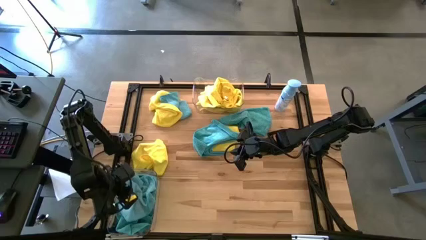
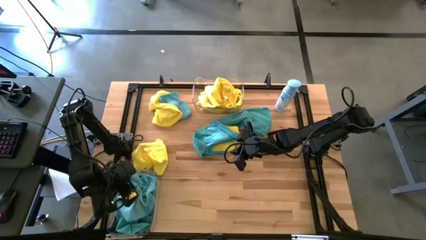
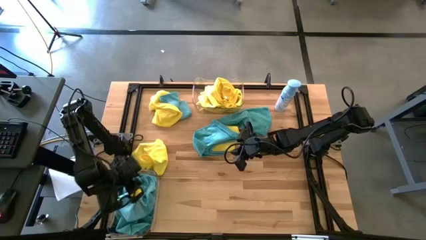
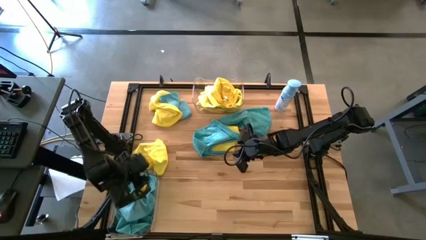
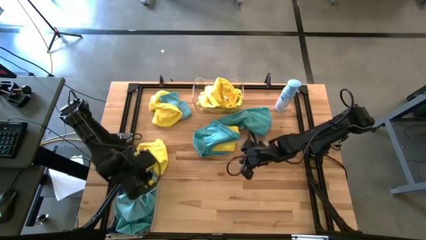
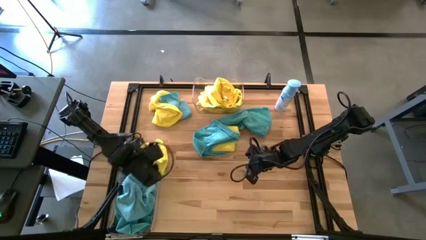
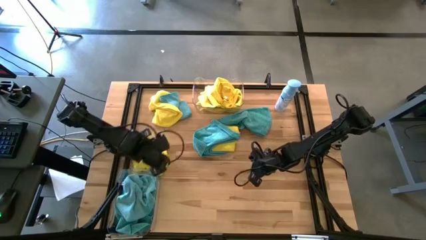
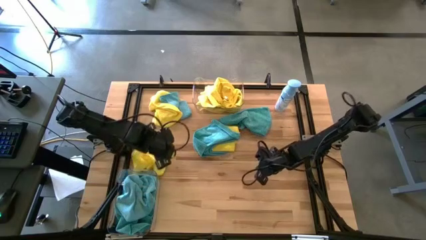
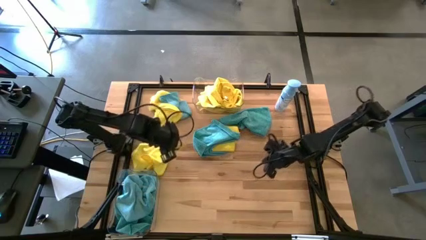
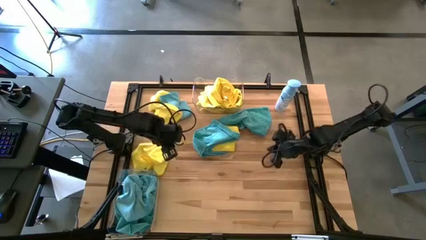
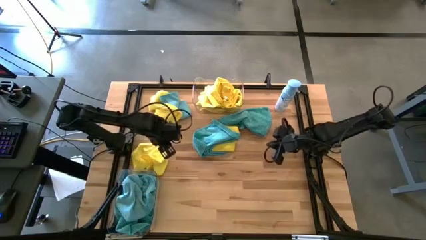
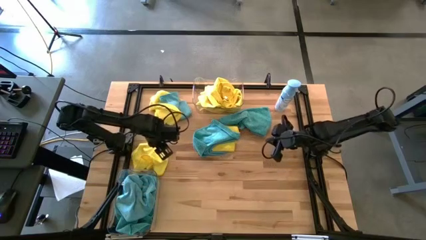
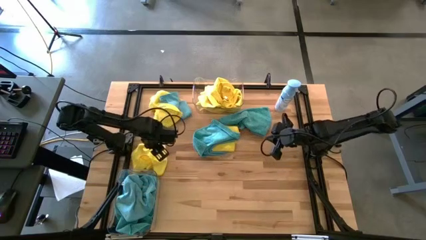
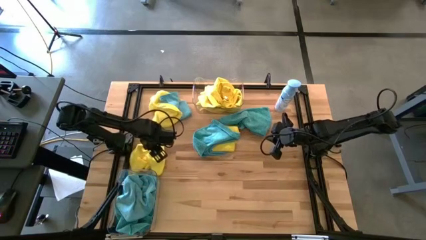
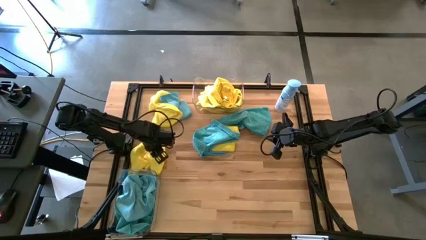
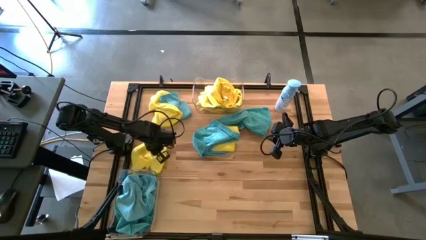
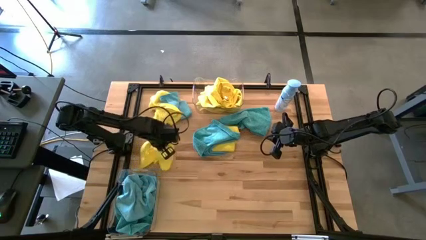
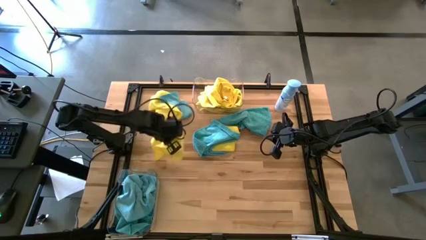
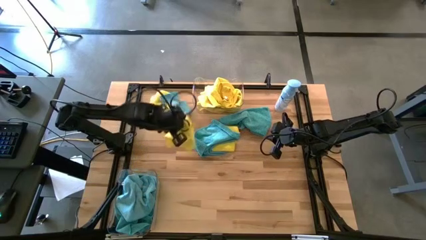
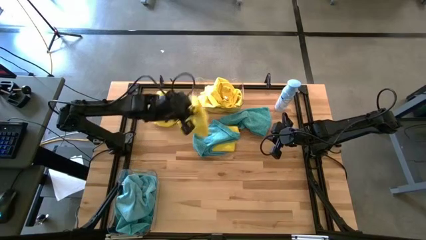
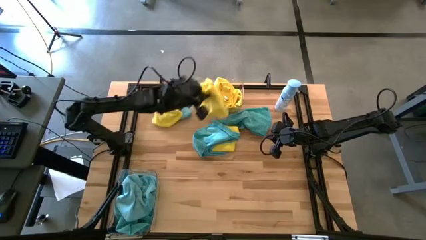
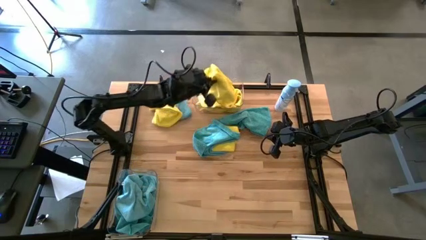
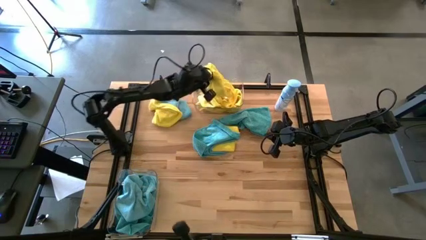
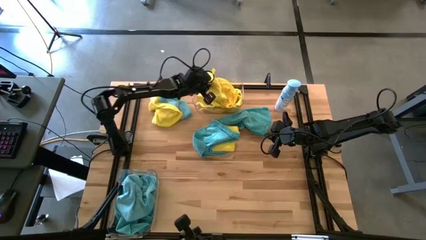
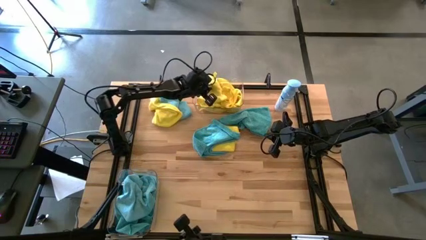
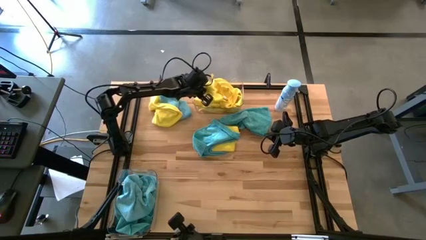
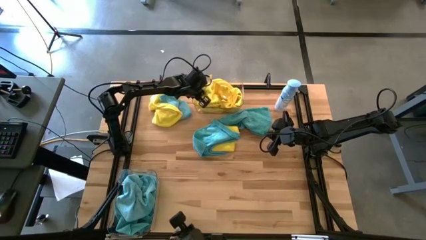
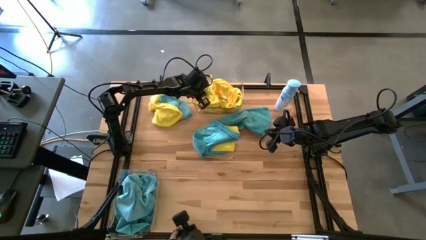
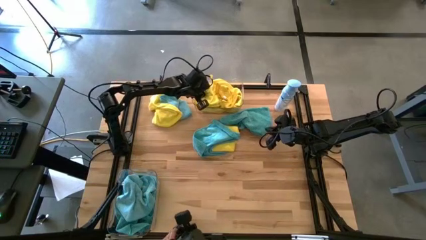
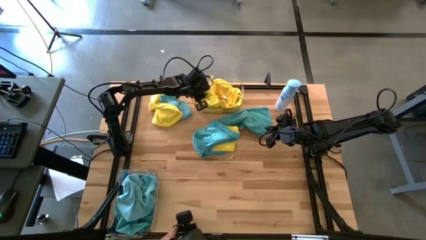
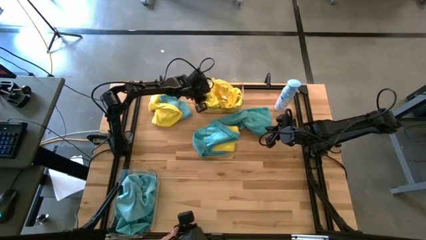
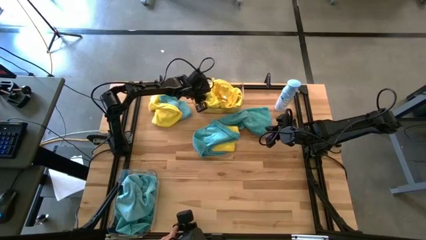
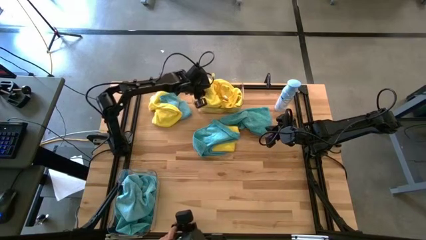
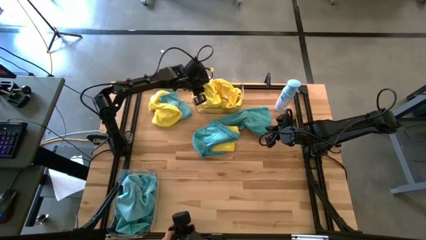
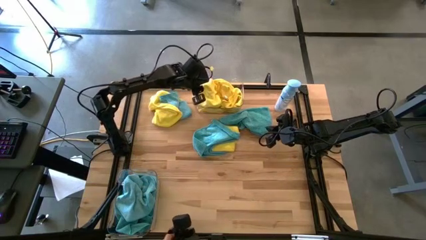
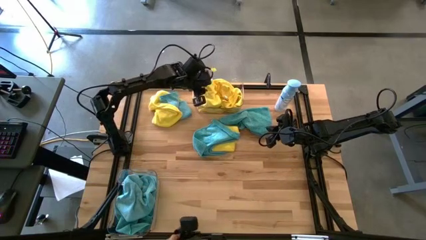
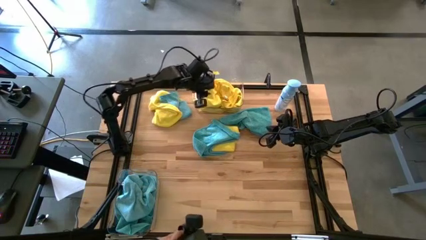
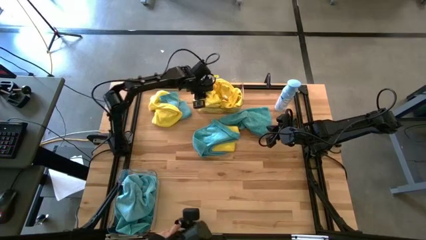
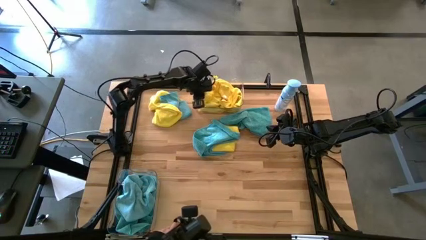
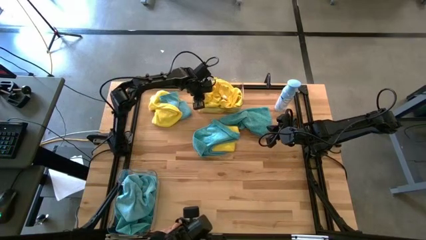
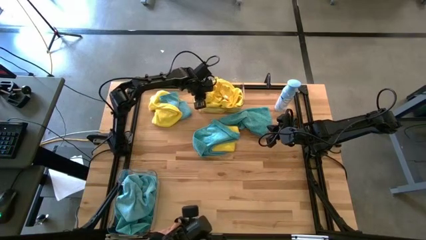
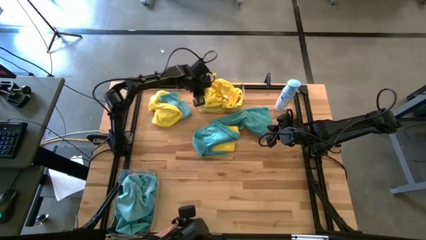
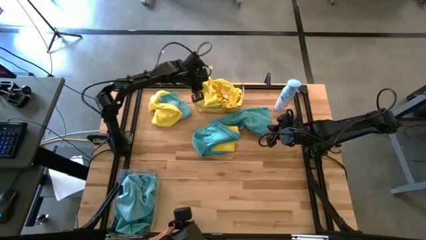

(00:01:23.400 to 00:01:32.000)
Task: Sort microfiber towel by color & place in baskets
Put the yellow microfiber towel into the top transparent bin

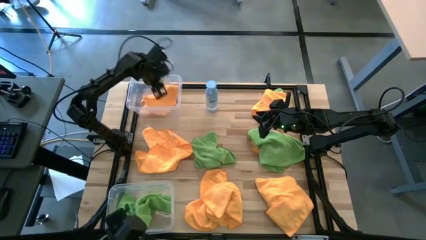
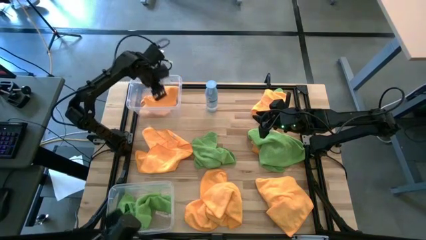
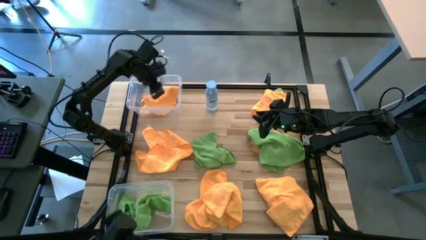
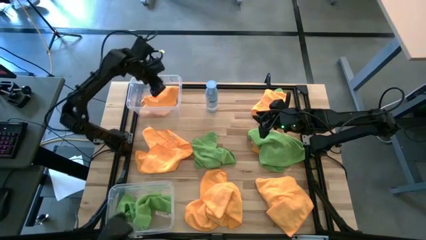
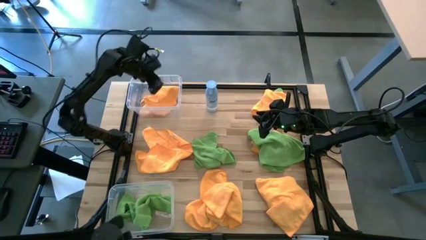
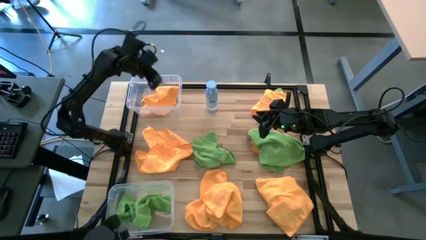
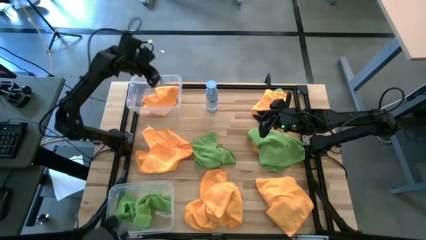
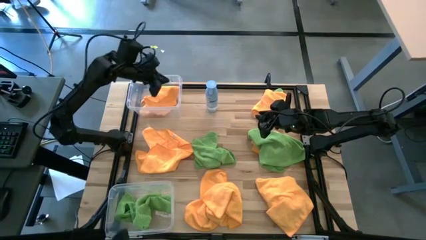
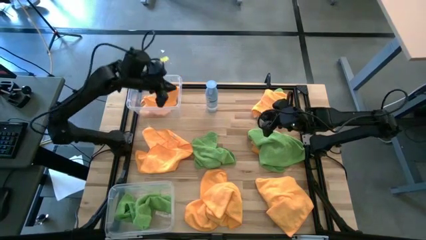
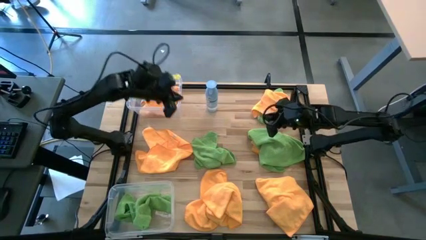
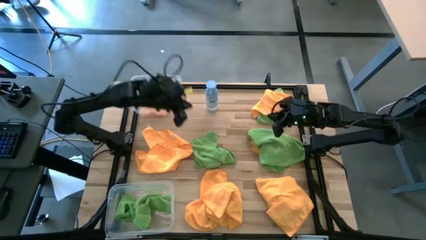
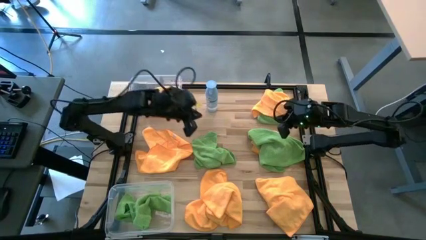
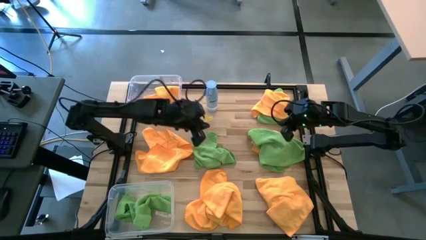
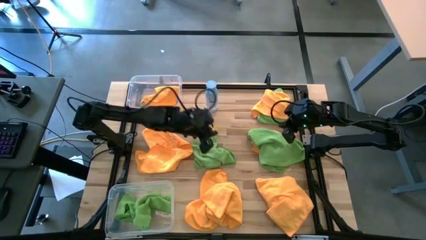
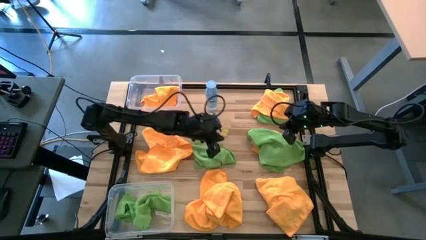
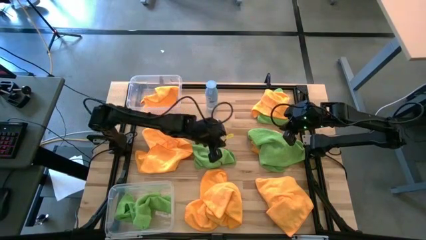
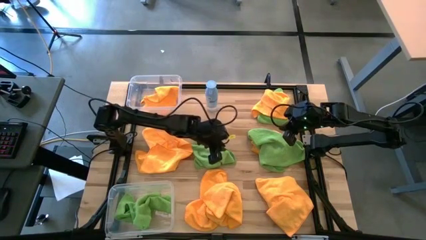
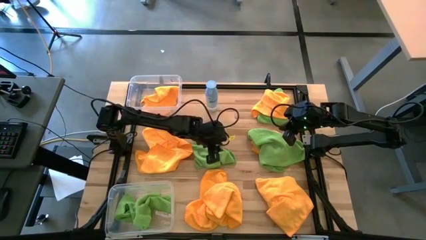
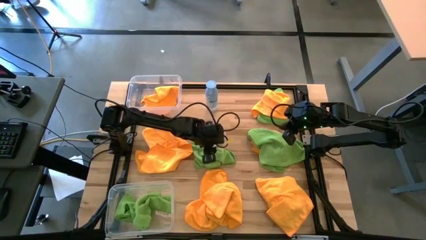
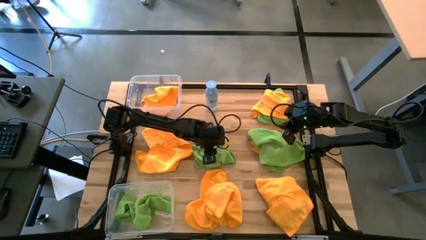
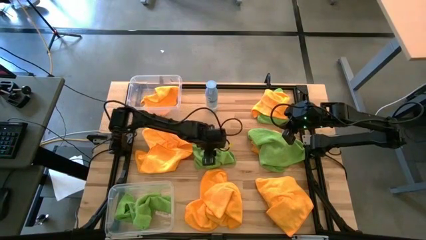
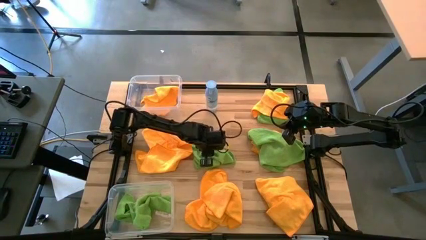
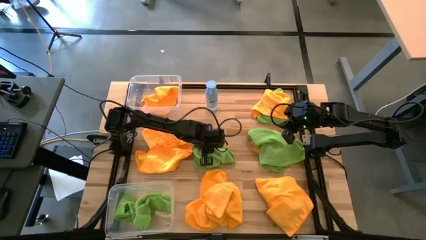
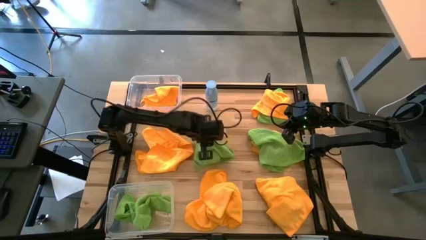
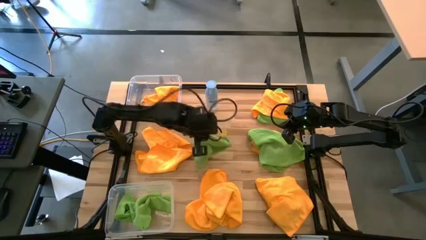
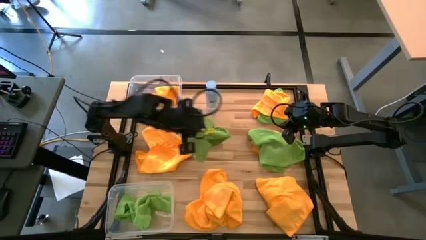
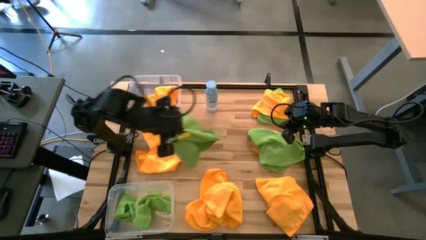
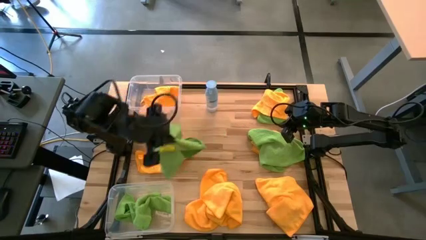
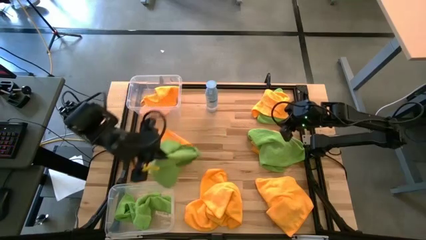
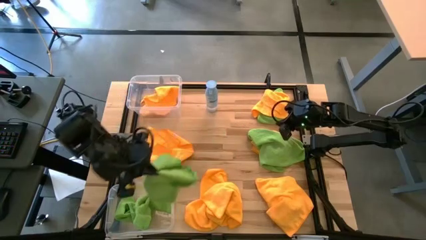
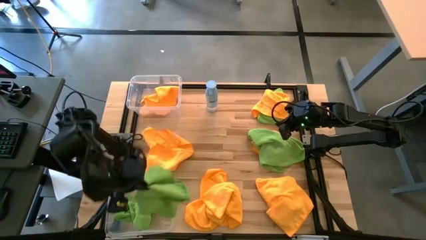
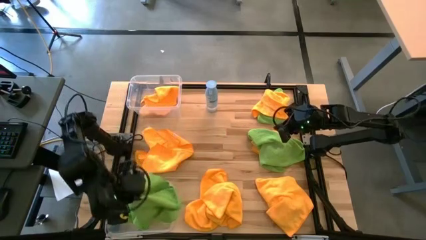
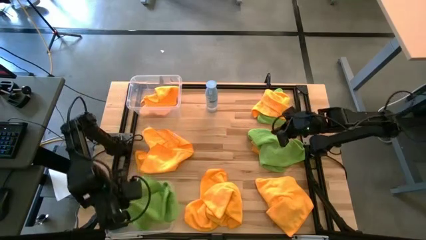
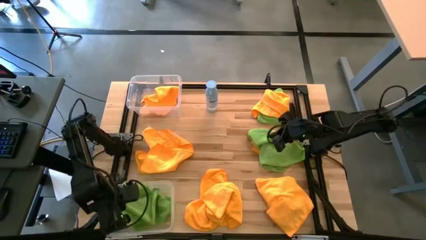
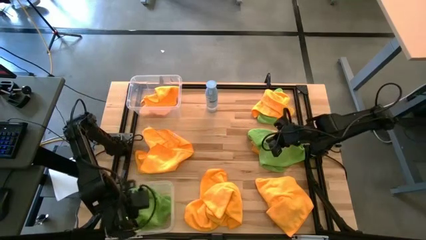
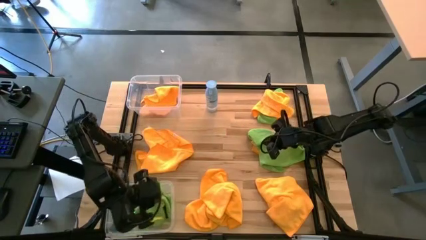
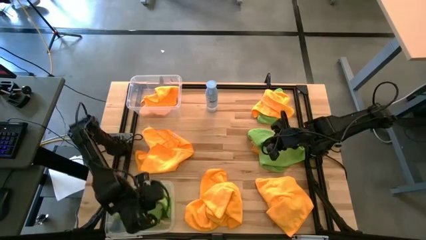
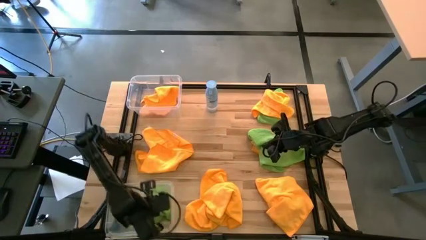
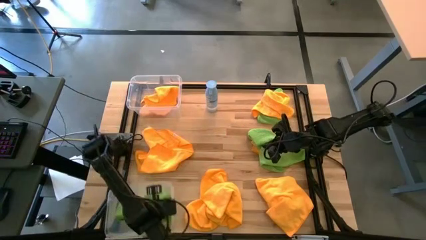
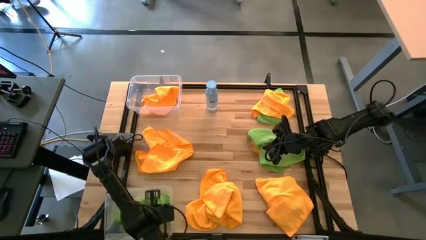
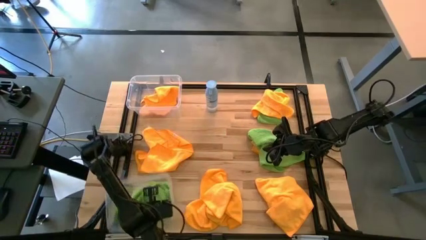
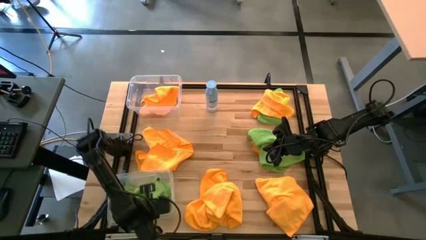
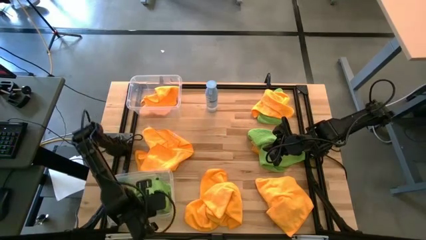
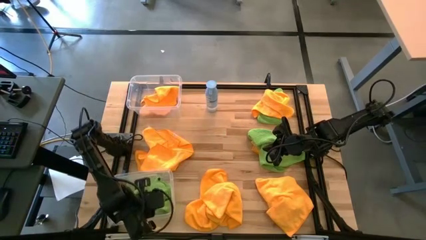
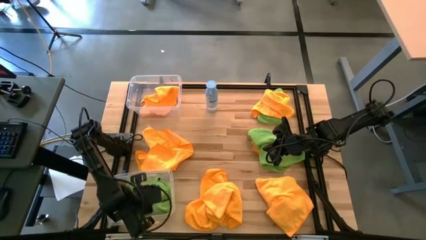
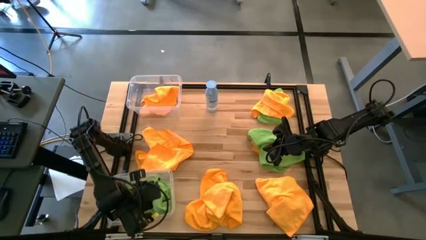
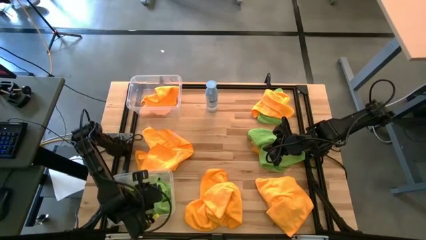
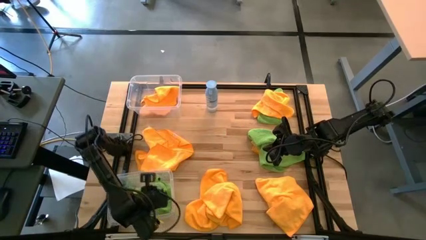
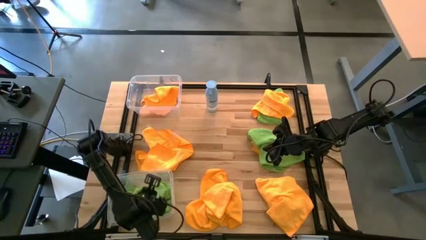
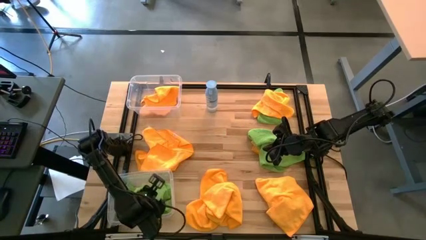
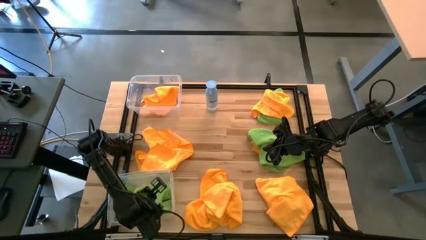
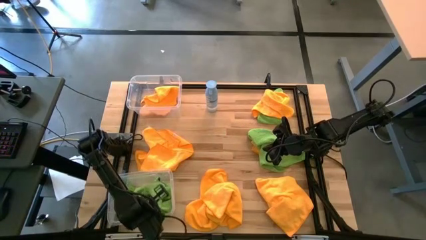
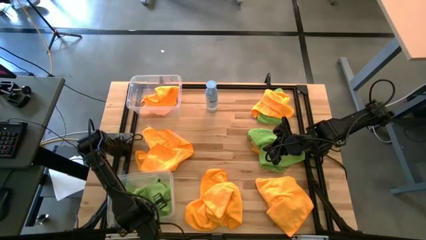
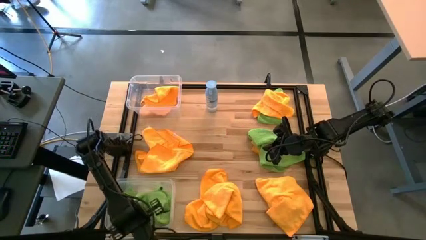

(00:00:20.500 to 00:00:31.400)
Task: Sort microfiber towel by color & place in baskets
Put the green microfiber towel into the bottom transparent bin
